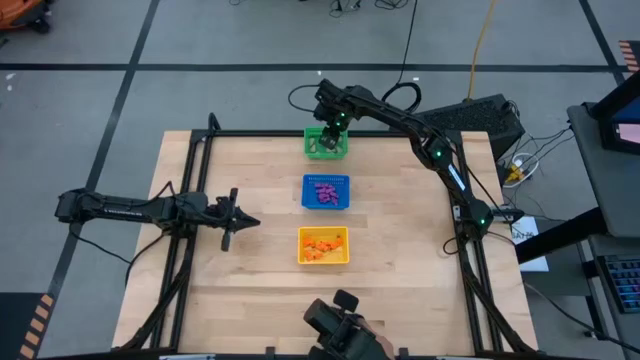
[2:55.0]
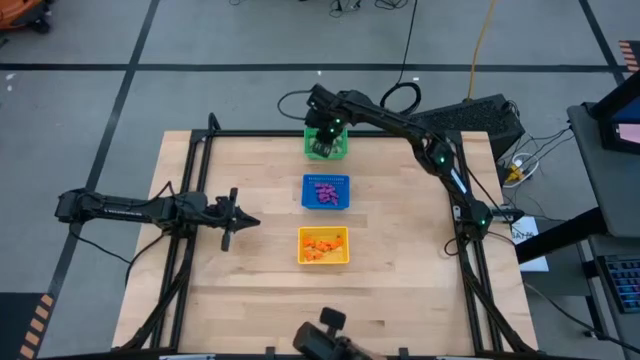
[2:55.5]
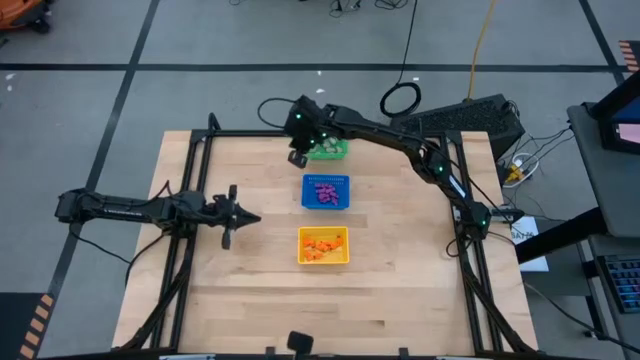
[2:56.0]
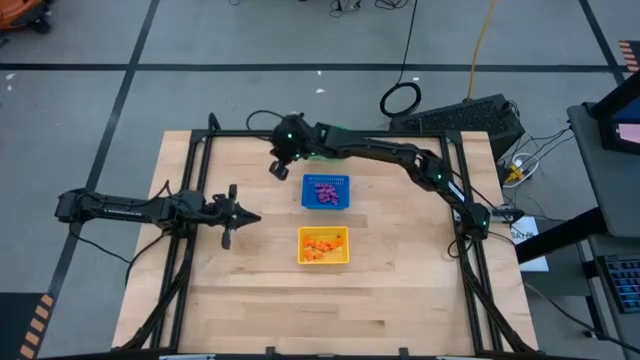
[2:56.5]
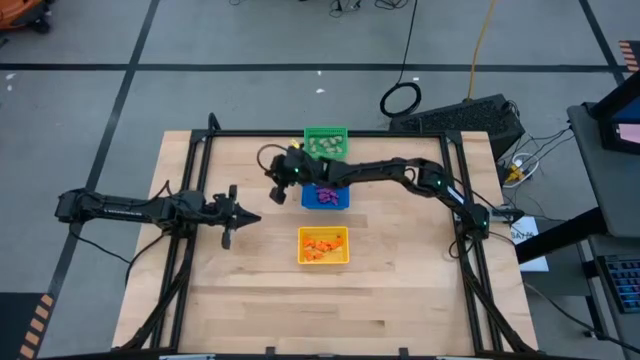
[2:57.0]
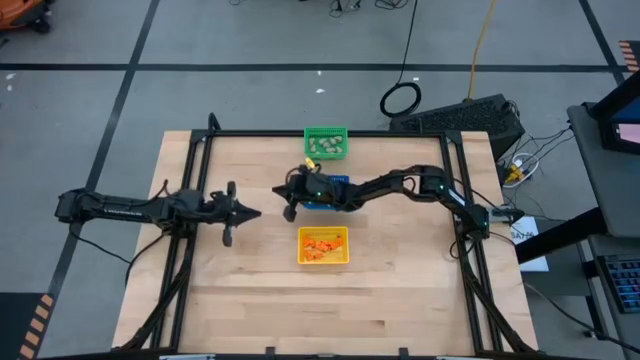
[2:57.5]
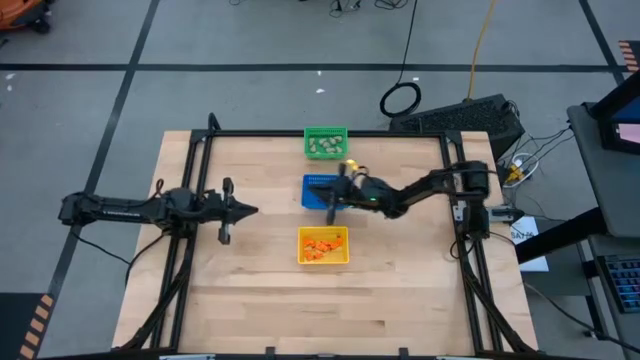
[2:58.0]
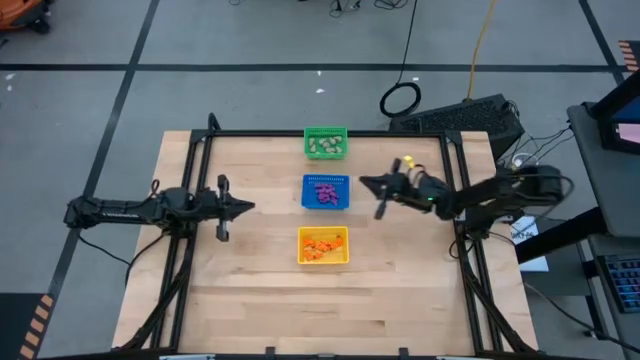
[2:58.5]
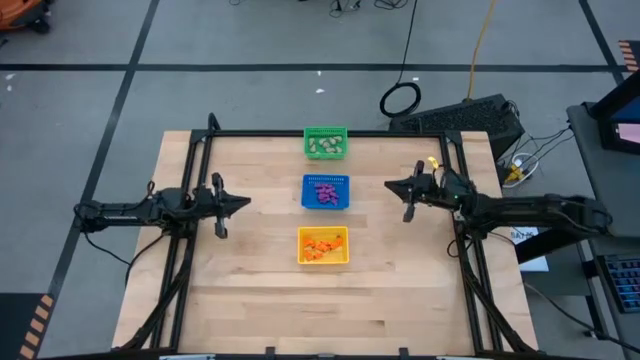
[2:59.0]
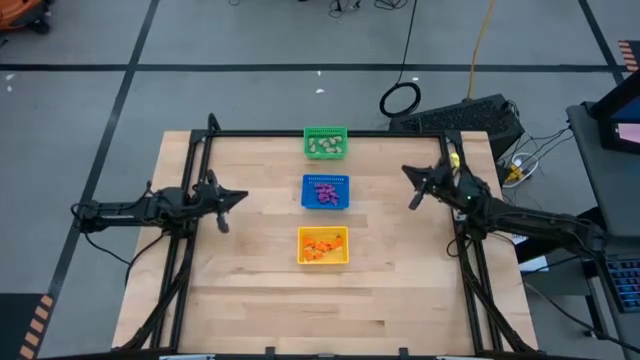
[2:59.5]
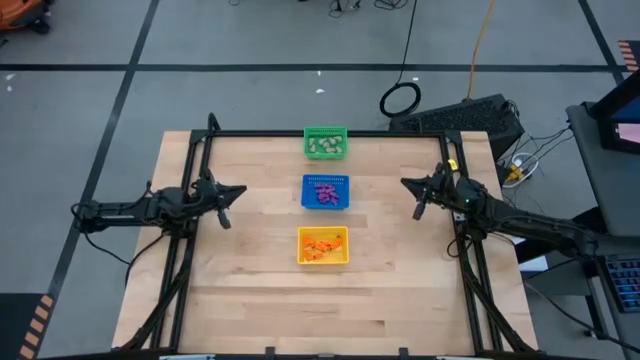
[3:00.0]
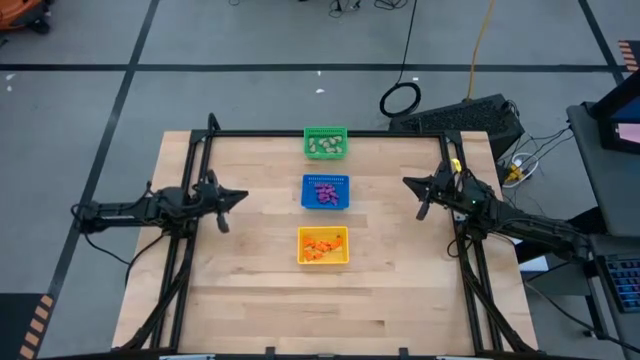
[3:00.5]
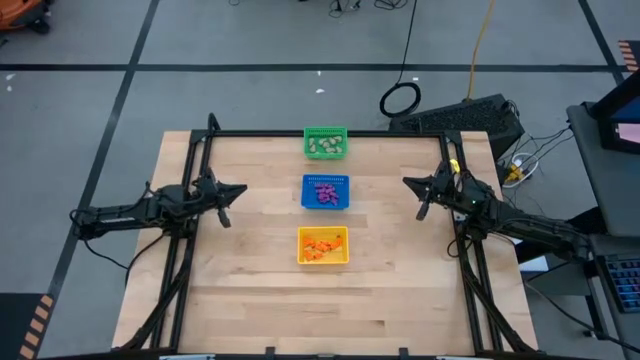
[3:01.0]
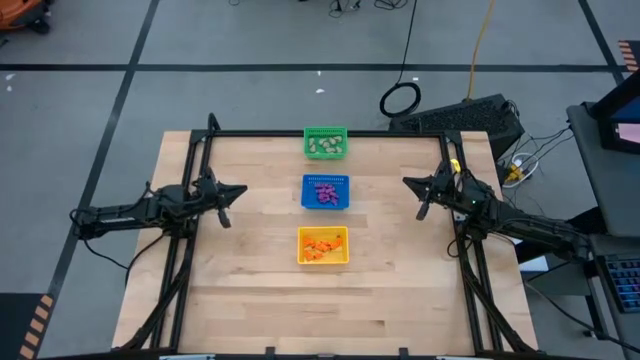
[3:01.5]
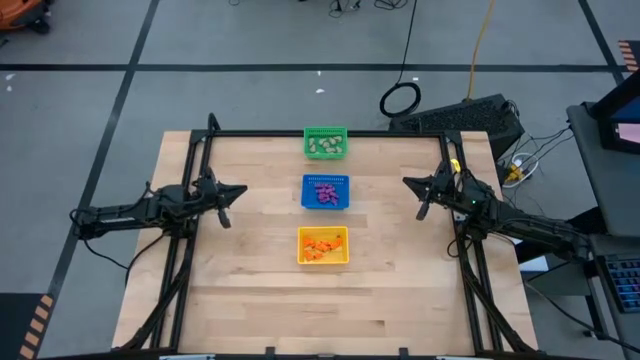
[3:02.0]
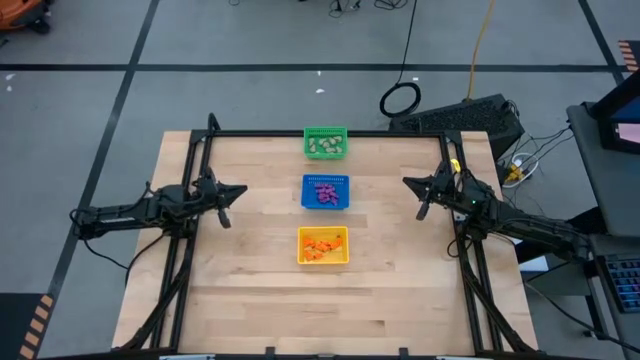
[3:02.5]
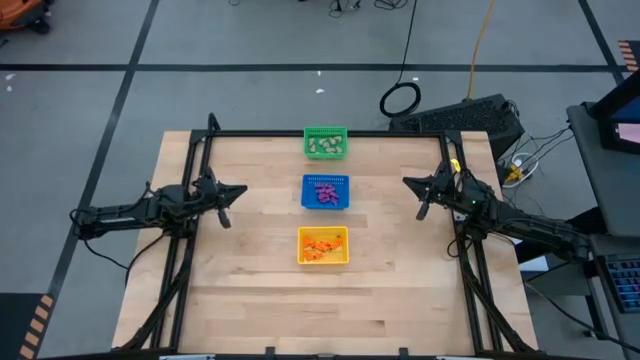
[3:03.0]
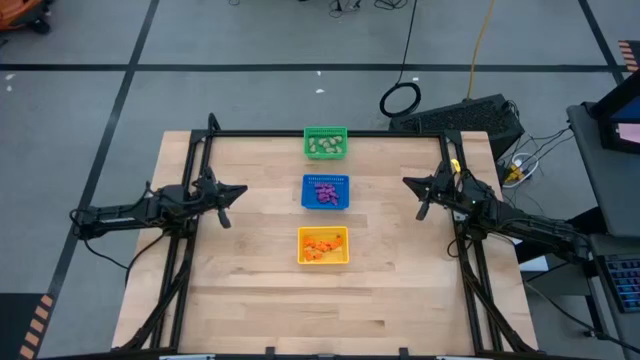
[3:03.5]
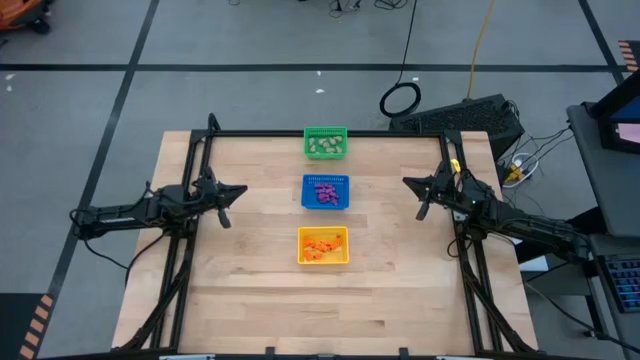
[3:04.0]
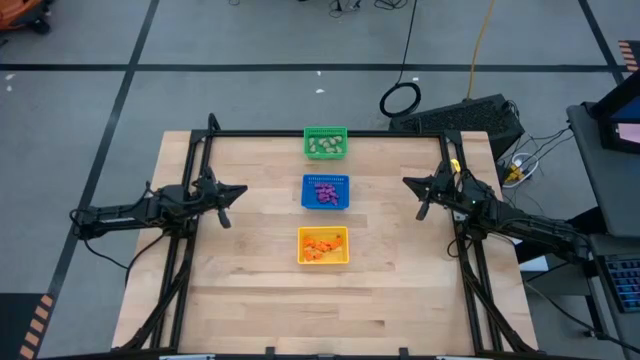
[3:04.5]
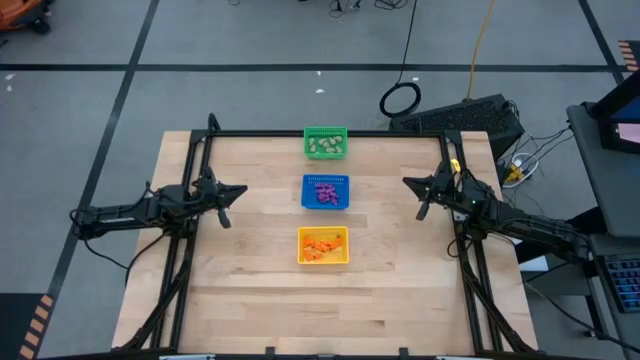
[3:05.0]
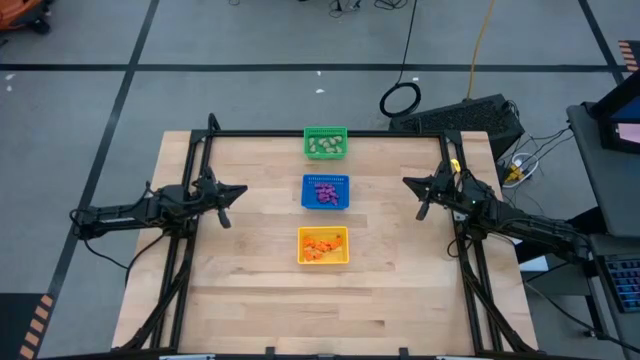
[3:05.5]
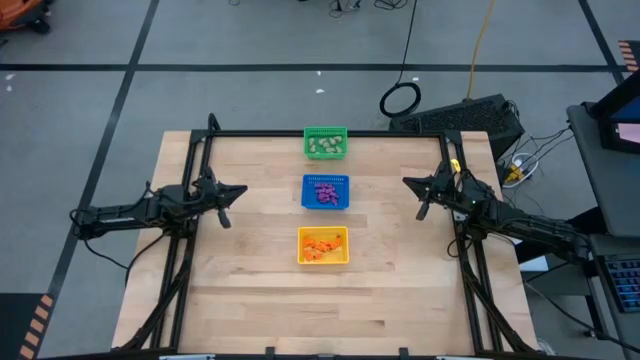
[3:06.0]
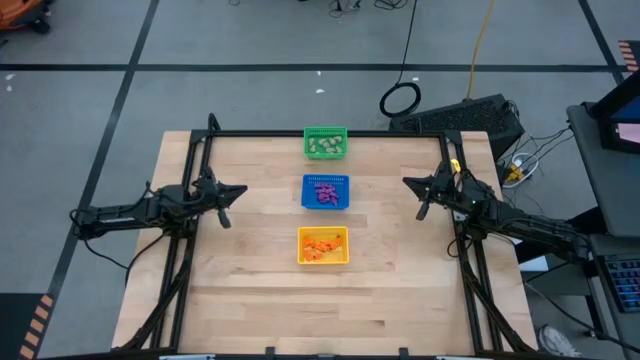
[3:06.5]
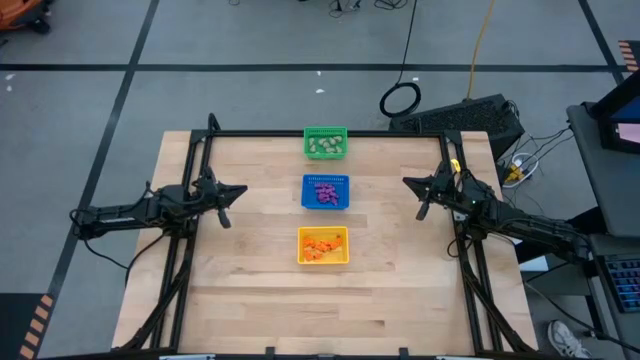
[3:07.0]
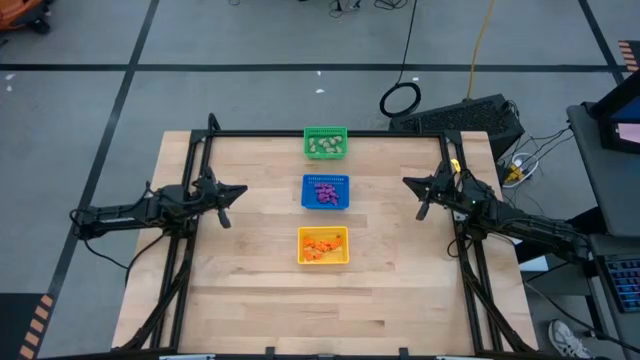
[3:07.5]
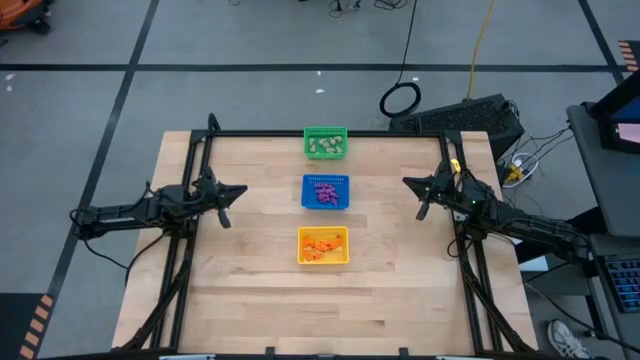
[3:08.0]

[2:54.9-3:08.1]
Task: Sort Halloween decoration
Return to Home Position

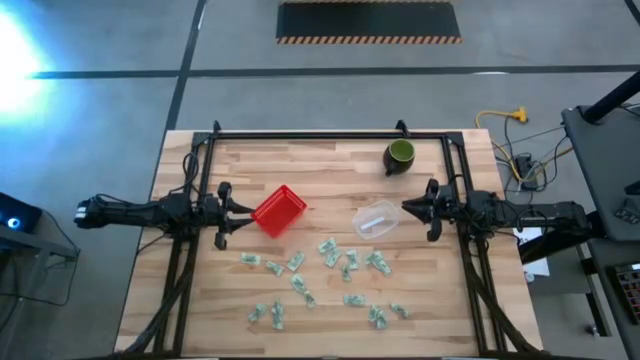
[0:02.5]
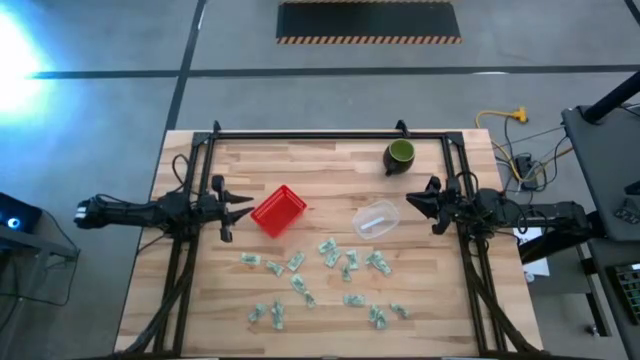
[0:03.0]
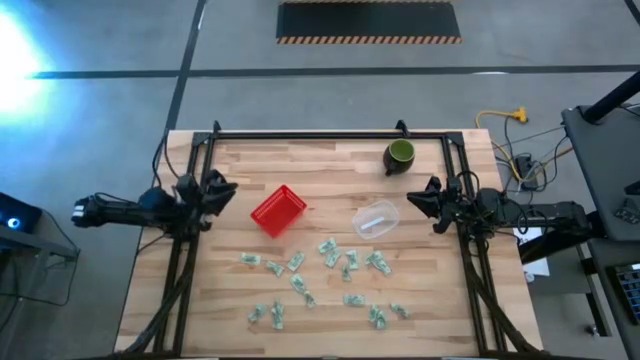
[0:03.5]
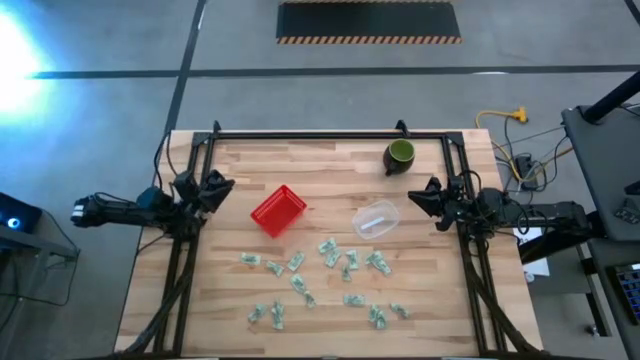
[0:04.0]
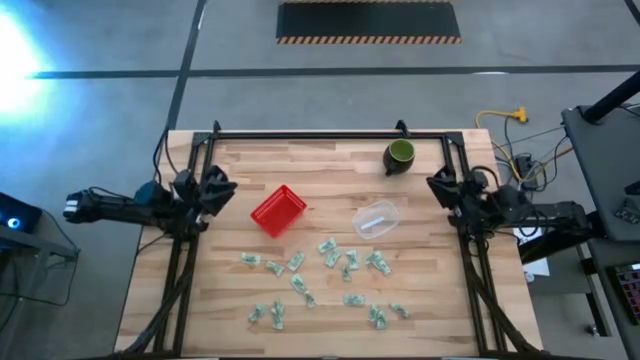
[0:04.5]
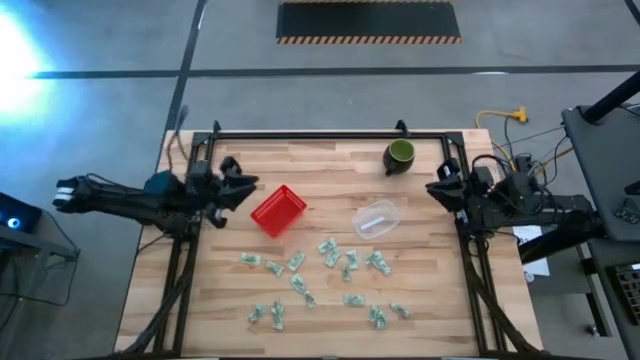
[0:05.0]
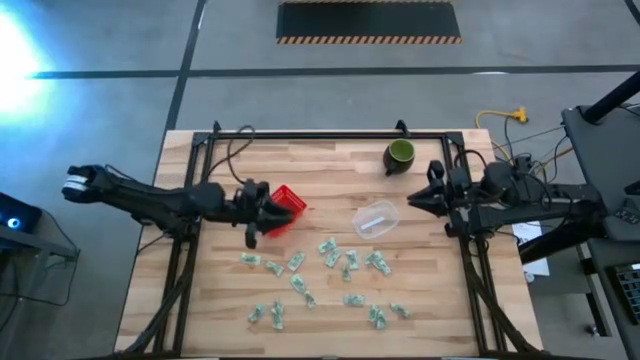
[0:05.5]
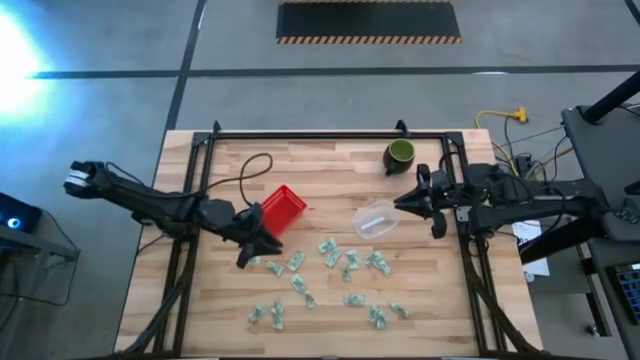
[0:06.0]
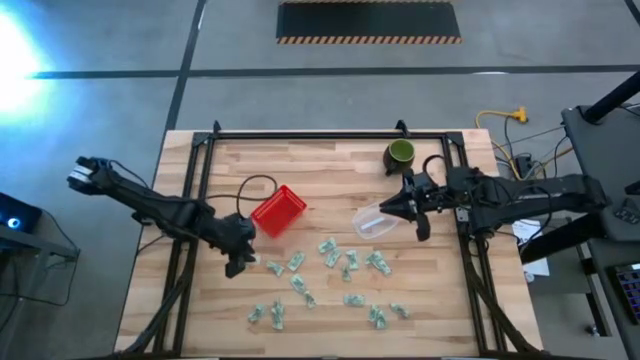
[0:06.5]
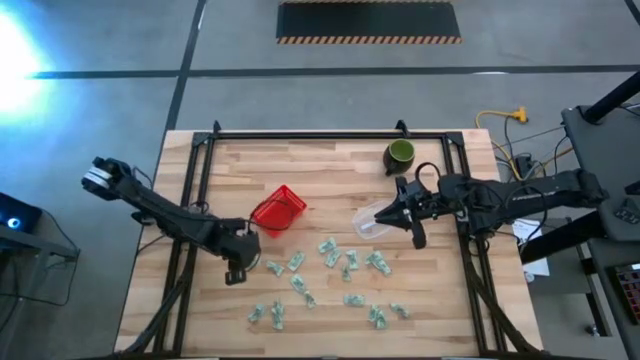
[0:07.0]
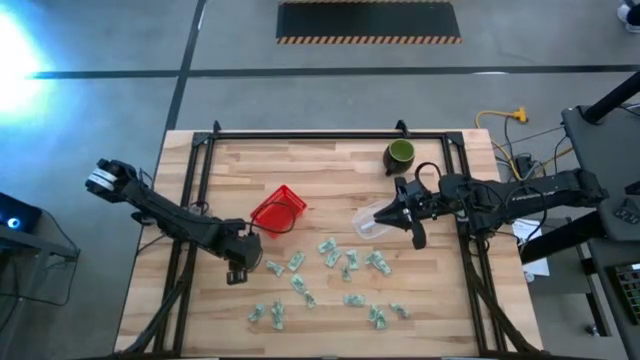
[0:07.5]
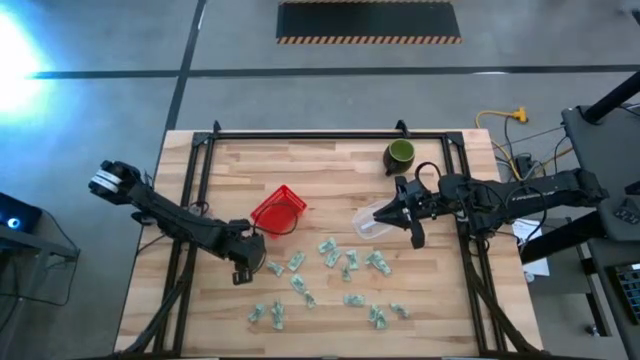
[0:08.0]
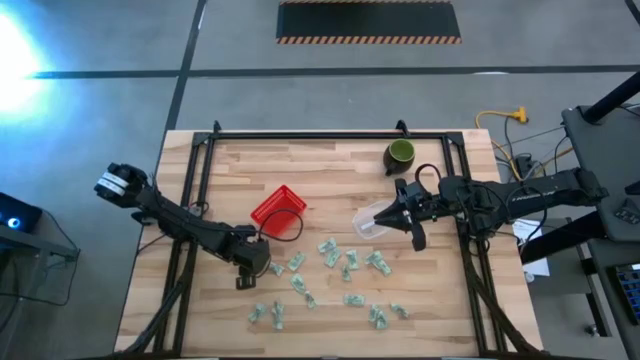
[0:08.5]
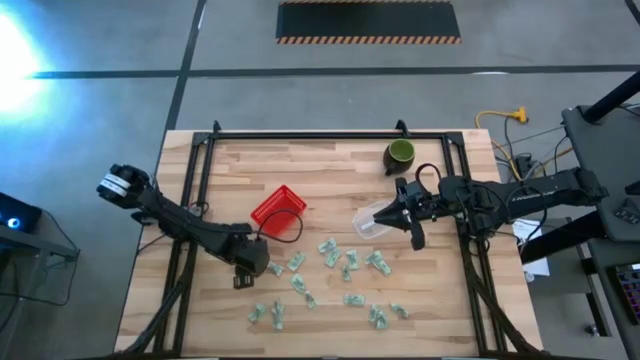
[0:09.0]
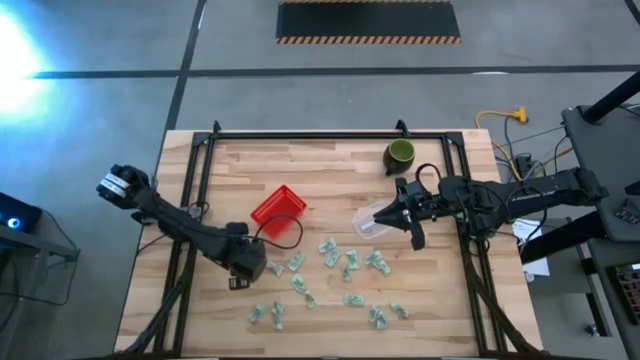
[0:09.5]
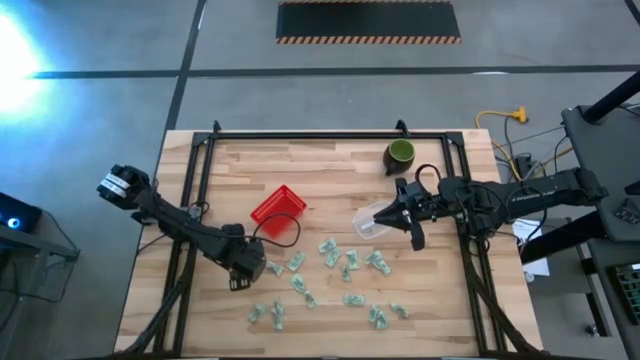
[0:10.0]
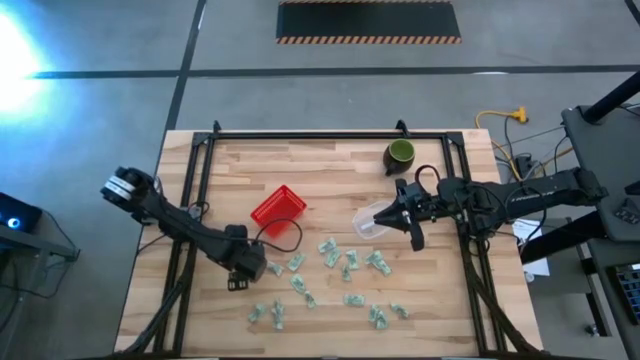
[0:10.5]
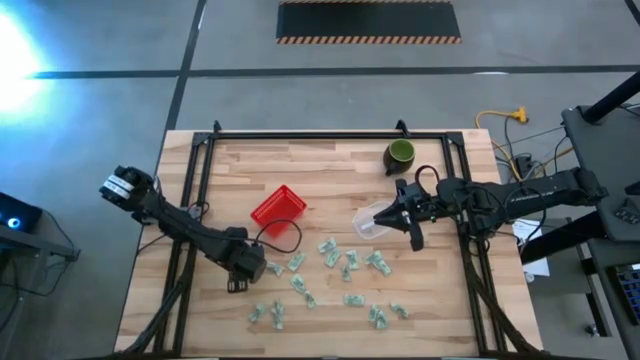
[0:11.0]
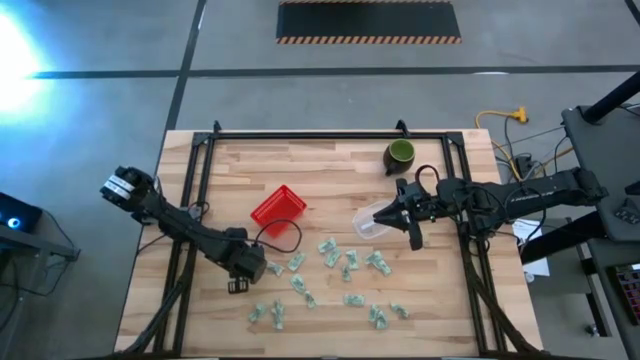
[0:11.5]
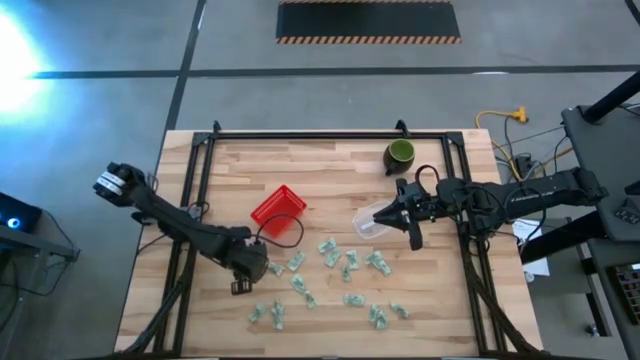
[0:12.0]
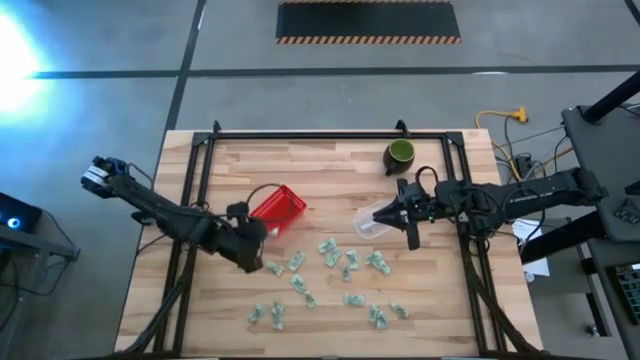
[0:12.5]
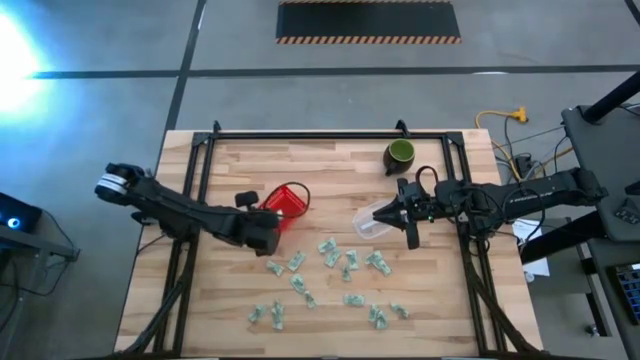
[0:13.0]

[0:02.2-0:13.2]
Task: Pick and place items into bin
Put the stevia packet into the red bin
